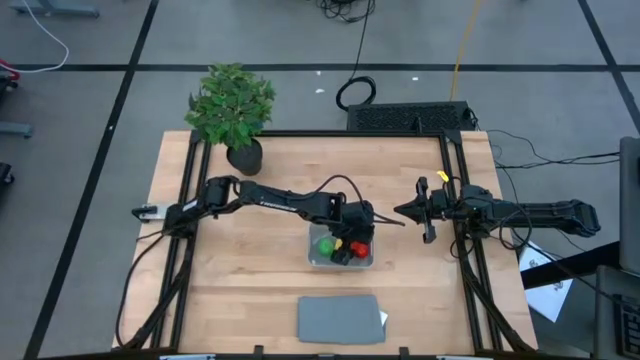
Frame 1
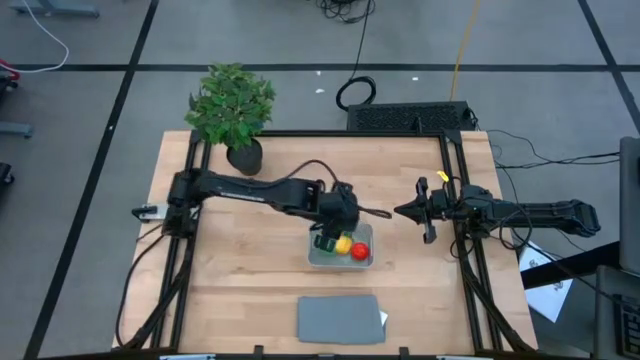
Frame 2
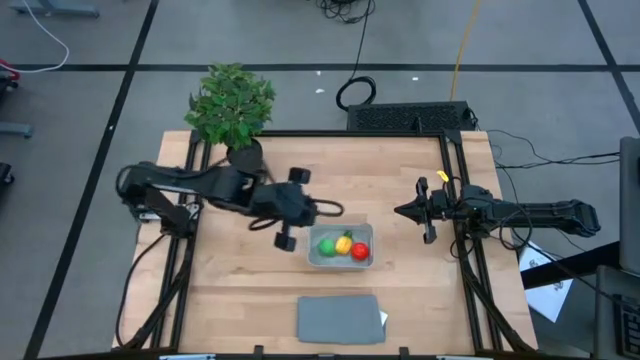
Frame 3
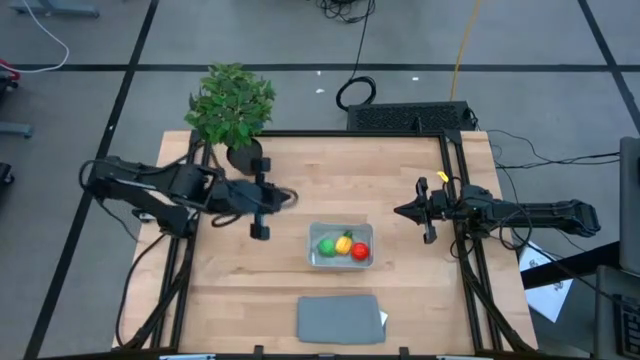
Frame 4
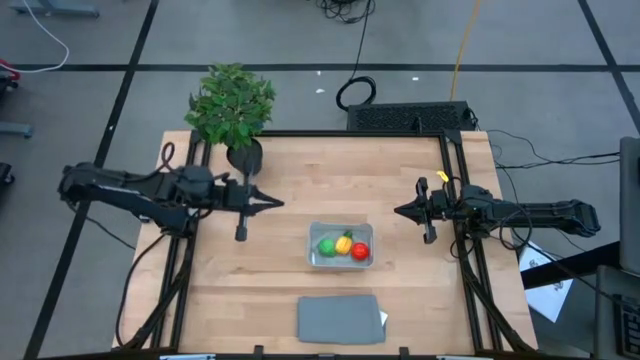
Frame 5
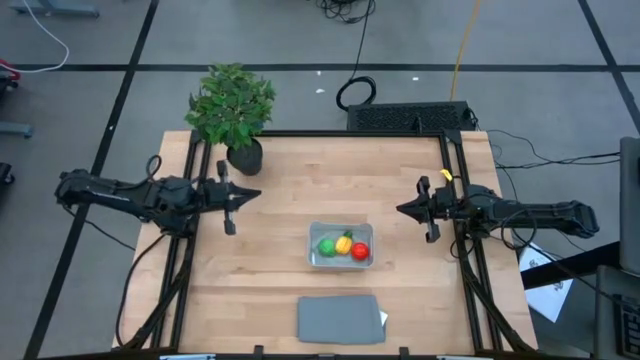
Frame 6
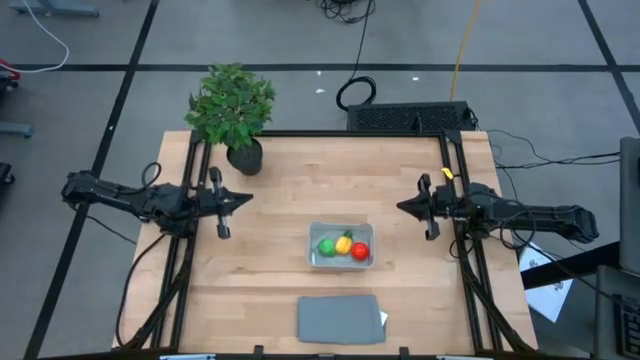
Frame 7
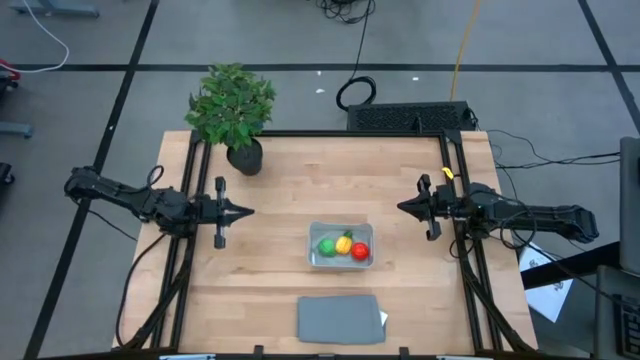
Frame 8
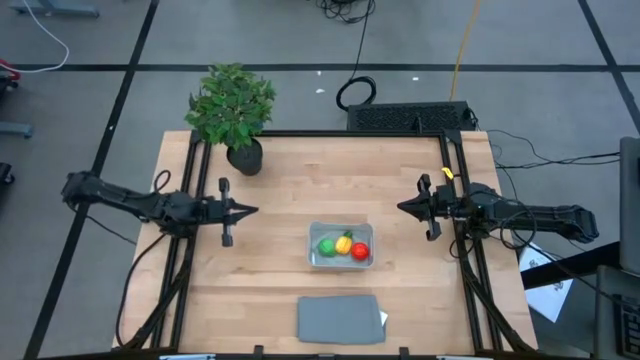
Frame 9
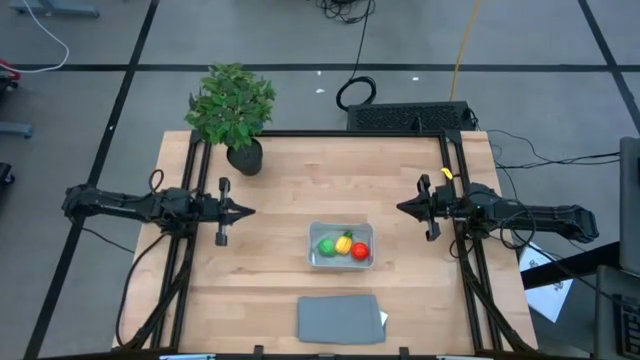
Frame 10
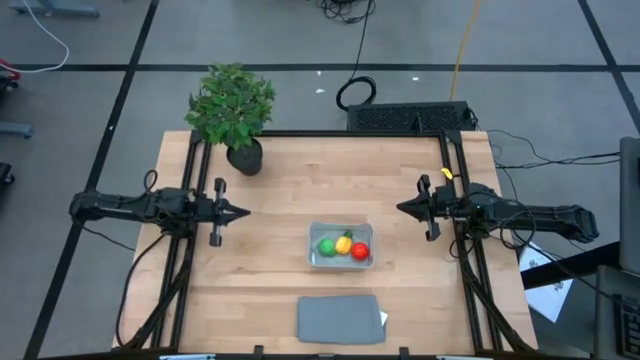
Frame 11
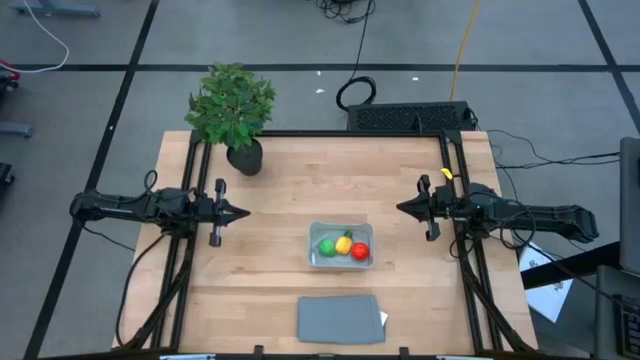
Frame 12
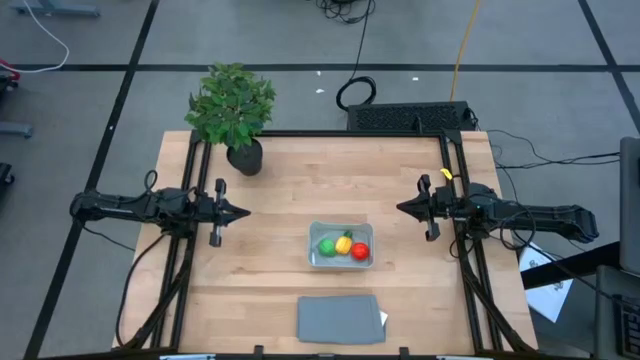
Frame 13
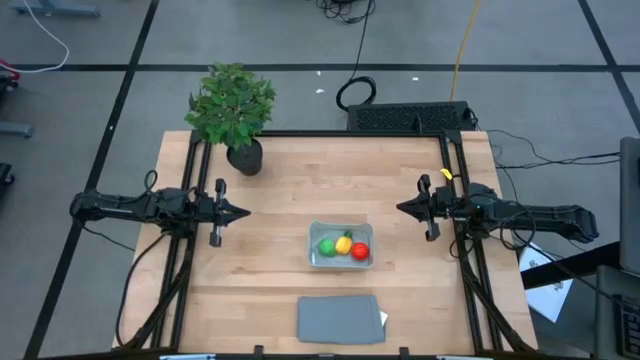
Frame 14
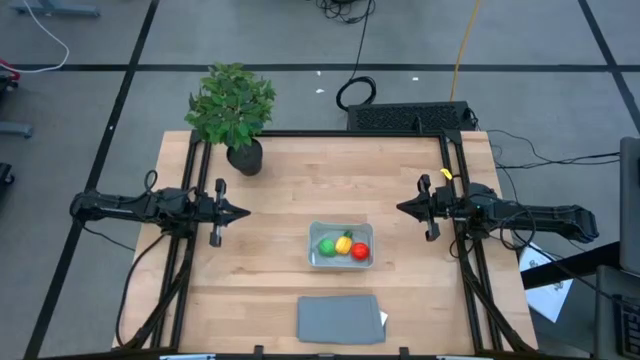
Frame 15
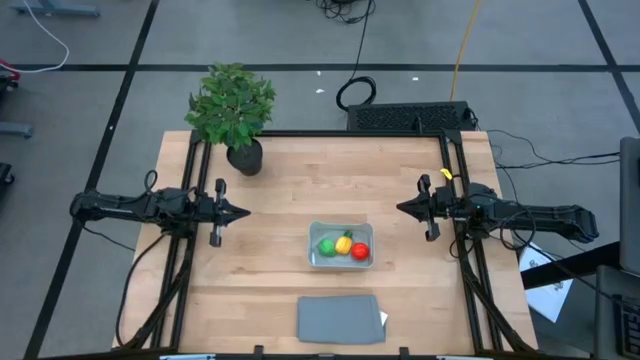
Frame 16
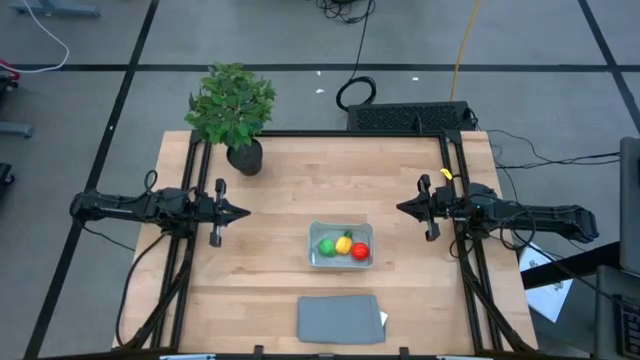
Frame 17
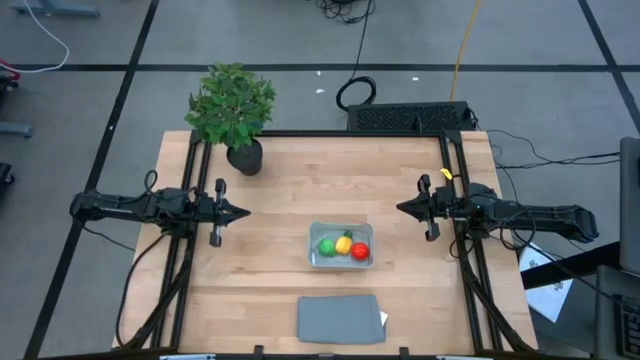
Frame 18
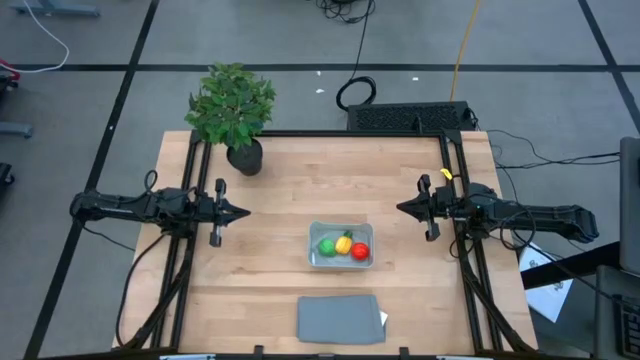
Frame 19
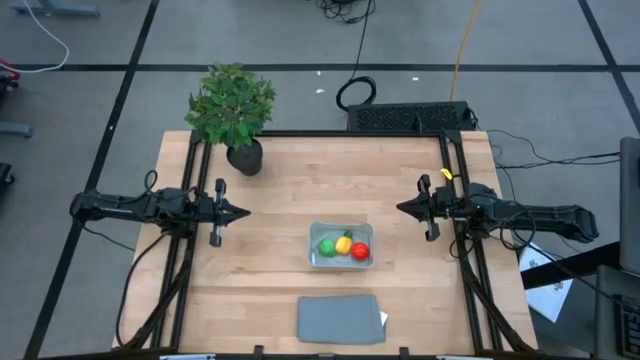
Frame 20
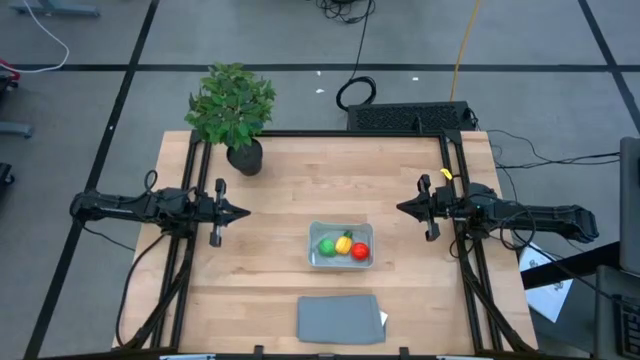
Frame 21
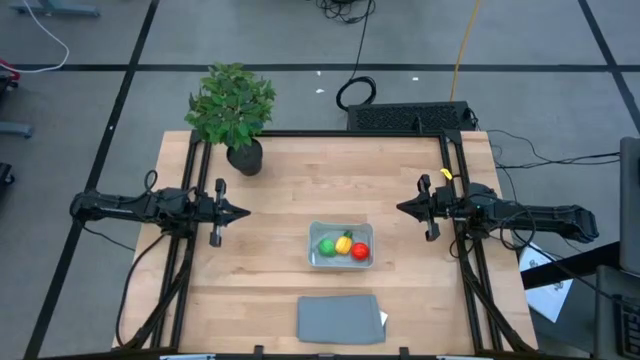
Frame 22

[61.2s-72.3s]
Task: Pick and placing Produce into tupperware
Return to Home Position

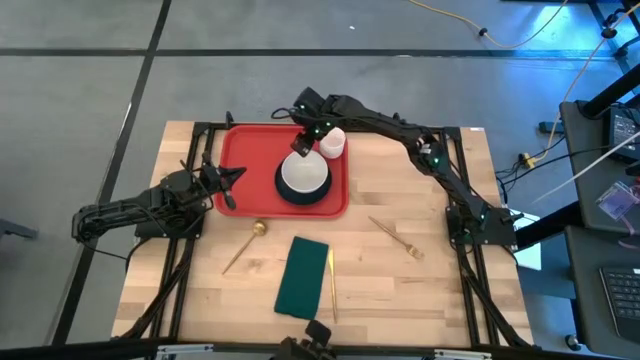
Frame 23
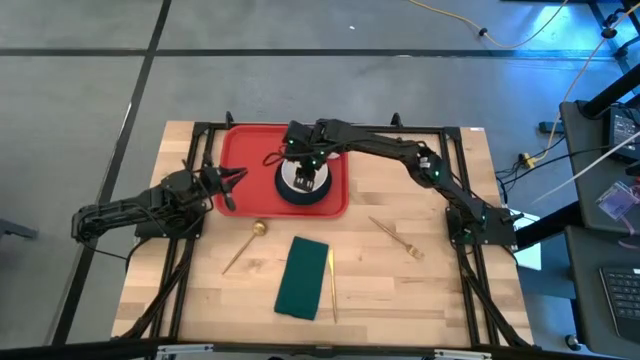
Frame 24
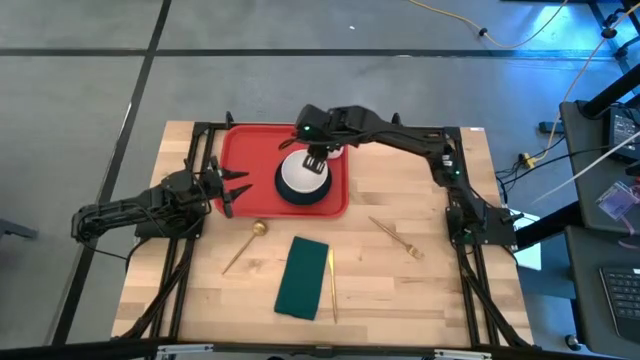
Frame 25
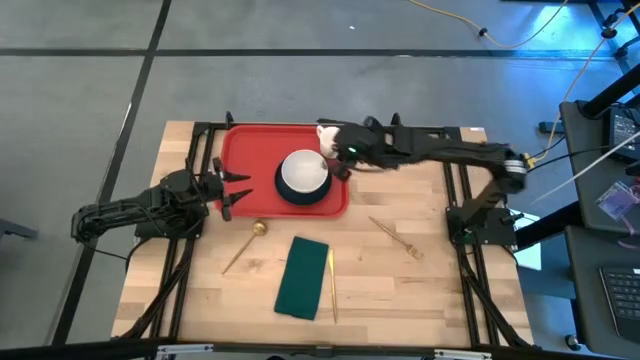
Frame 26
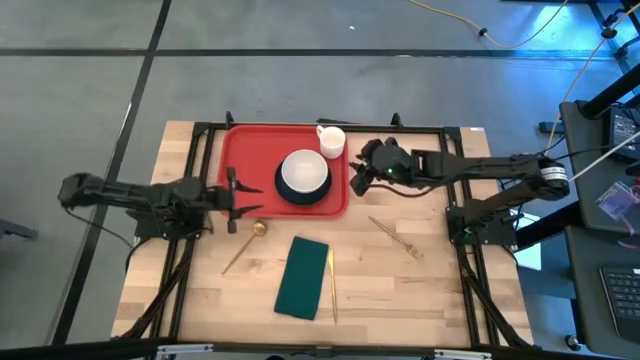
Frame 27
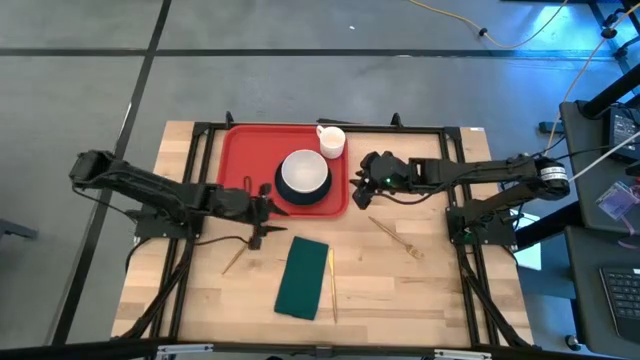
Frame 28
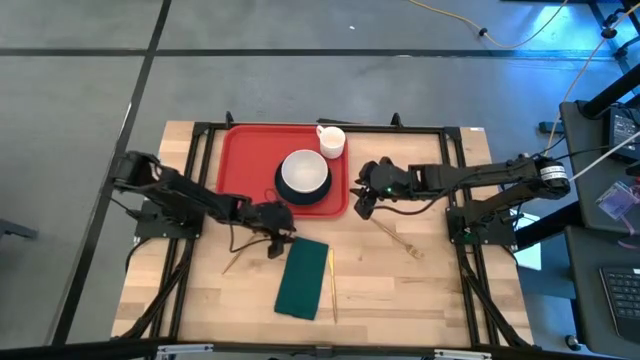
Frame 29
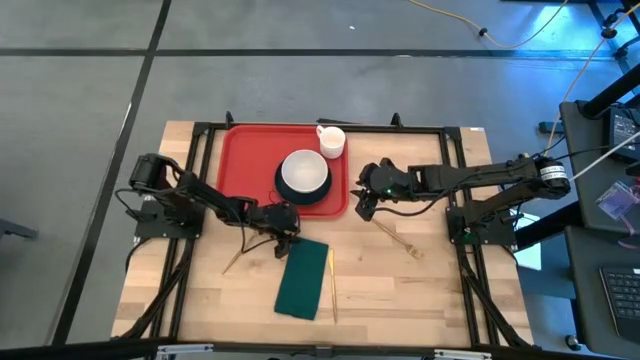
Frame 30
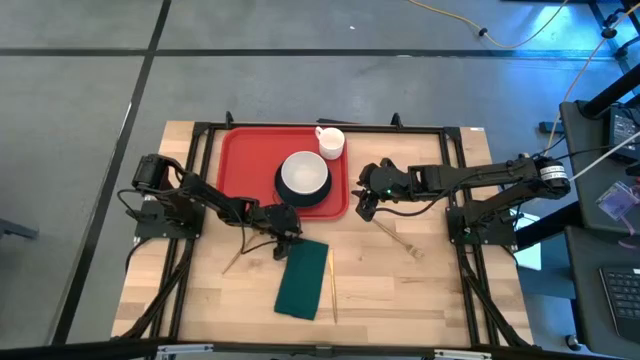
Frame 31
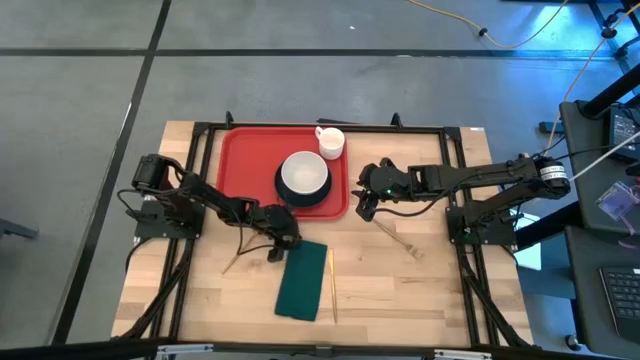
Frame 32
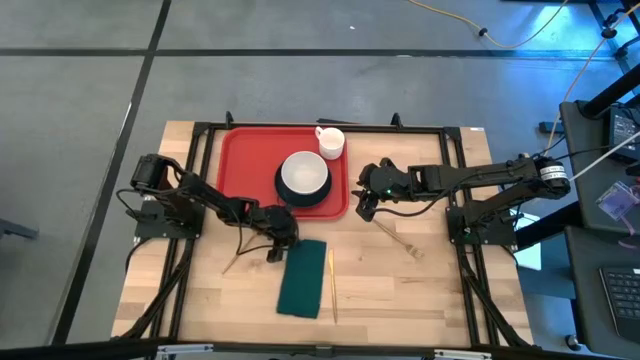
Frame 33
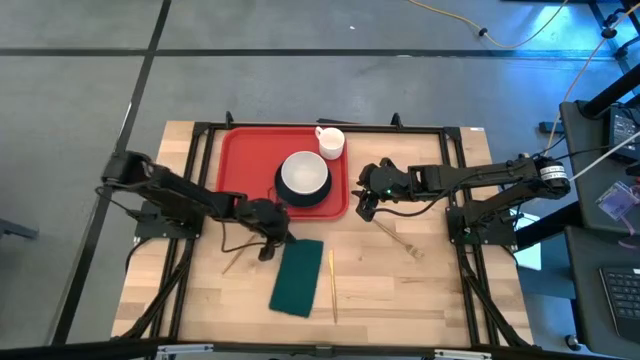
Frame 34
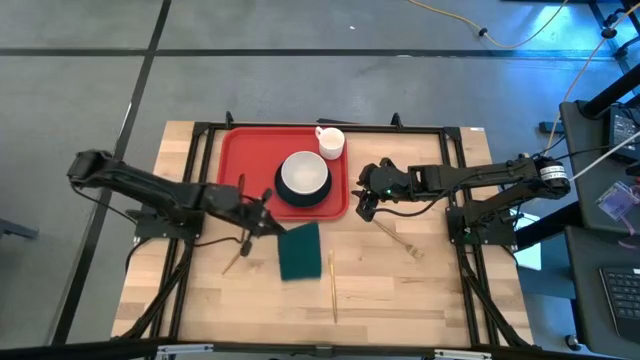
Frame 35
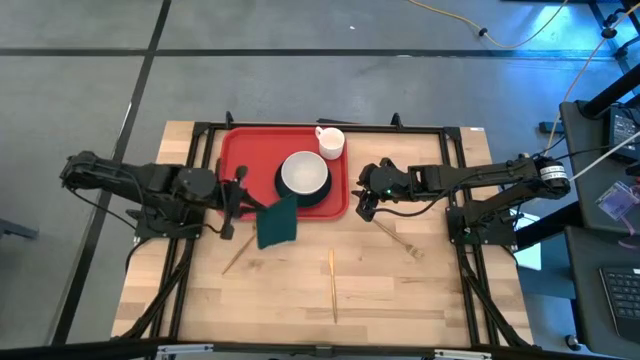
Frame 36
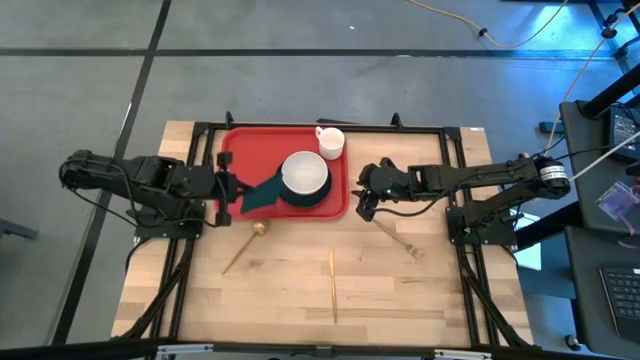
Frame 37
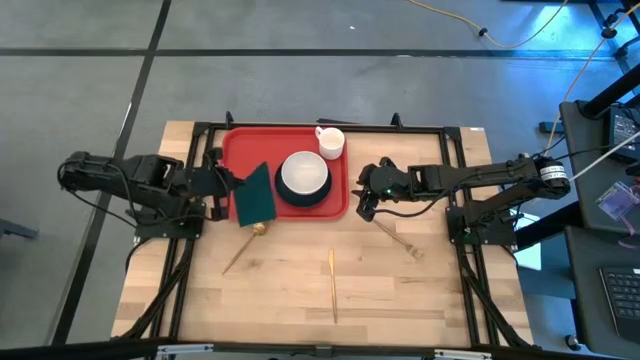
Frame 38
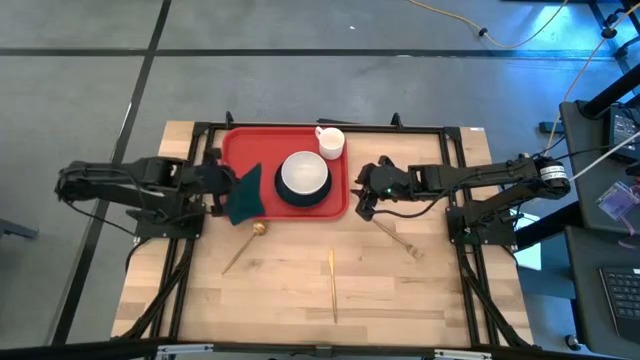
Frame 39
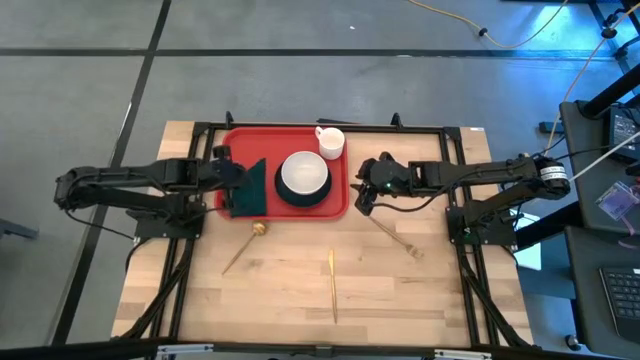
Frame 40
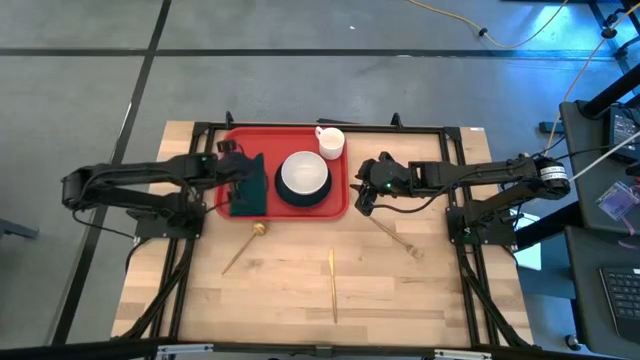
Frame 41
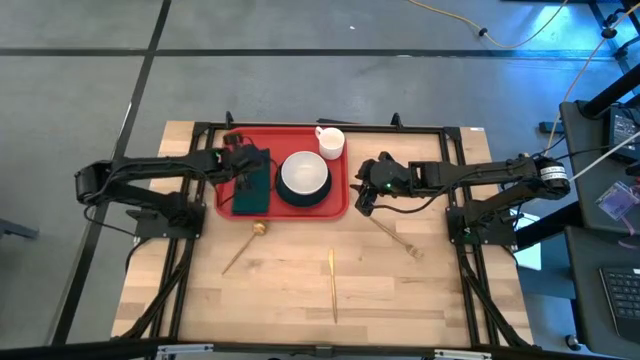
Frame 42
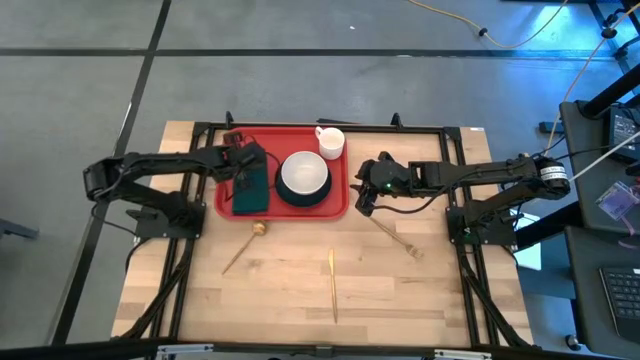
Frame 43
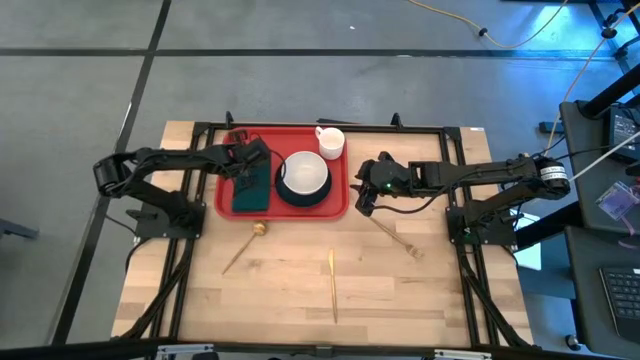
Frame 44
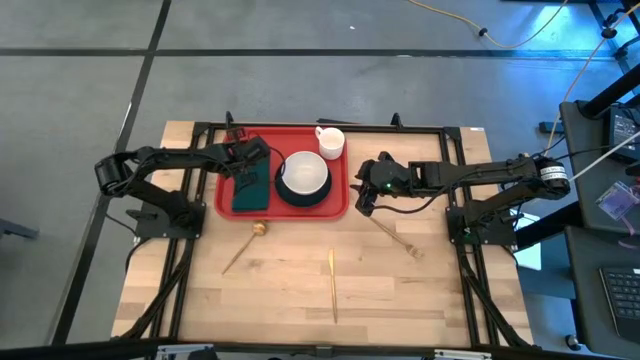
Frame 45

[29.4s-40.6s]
Task: Set up tray
Put the green napkin on the left of the red tray
